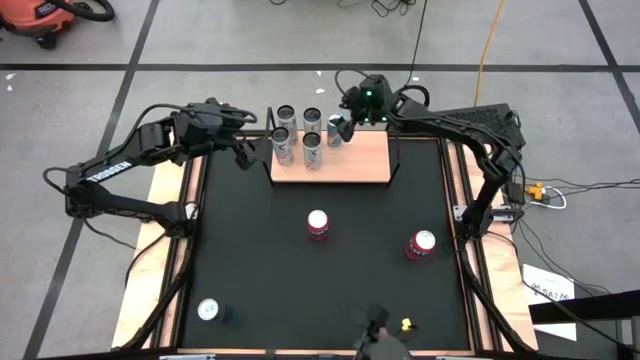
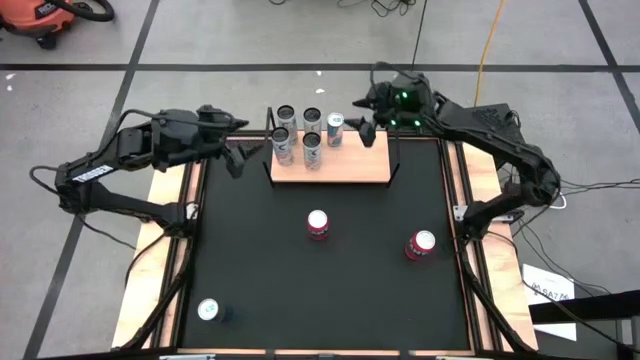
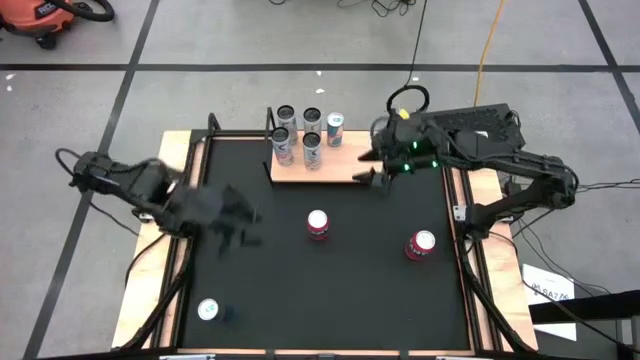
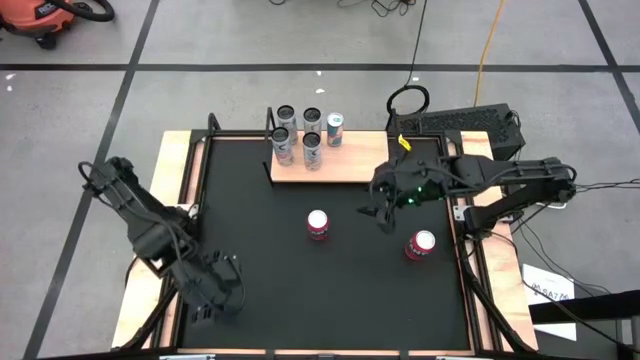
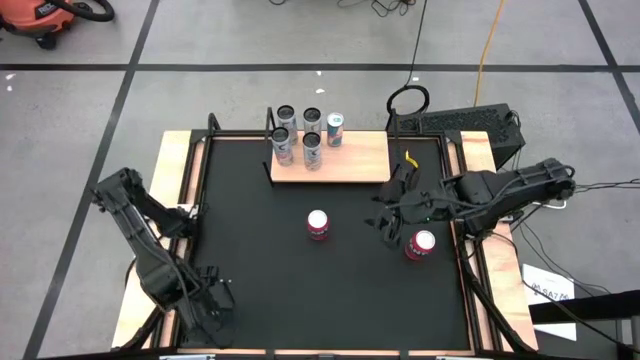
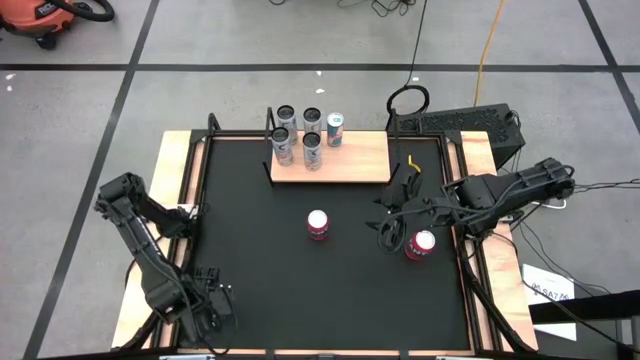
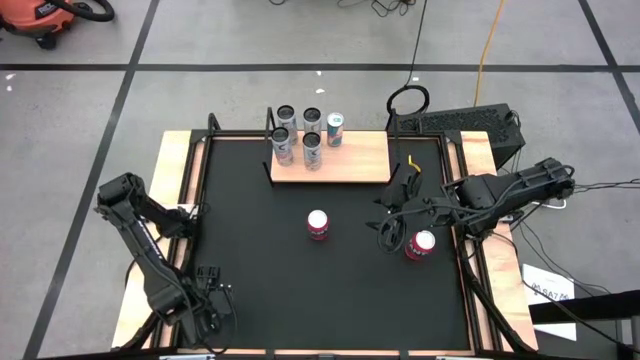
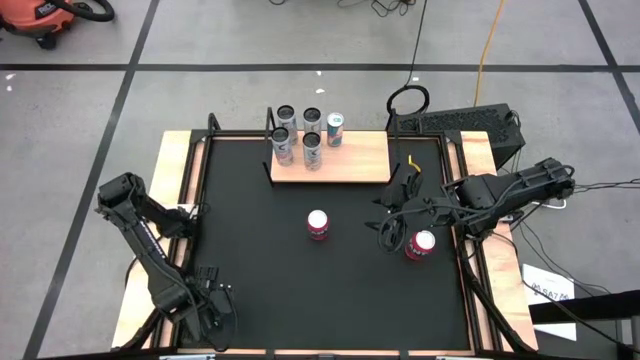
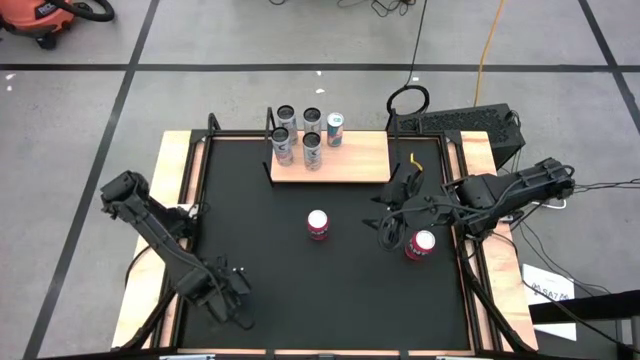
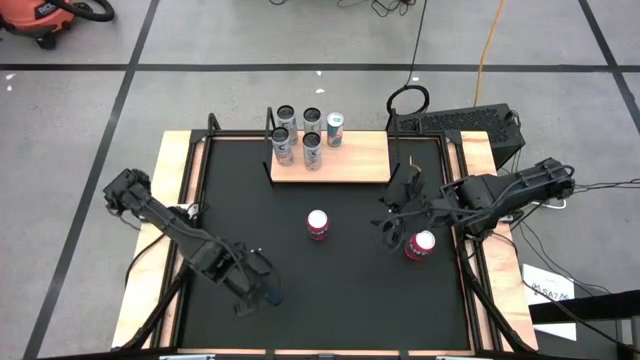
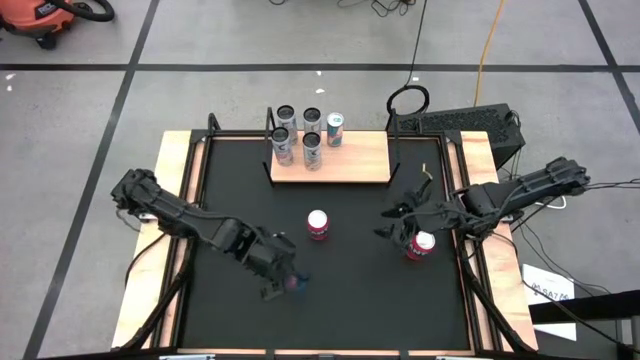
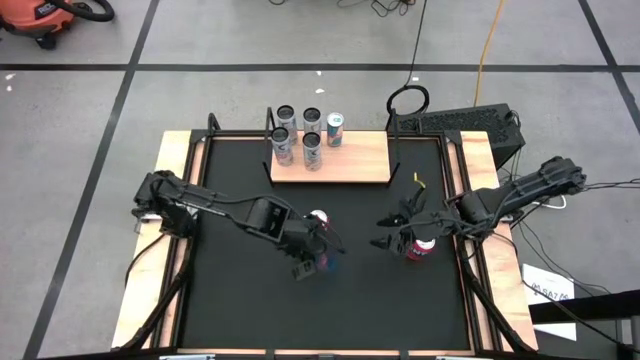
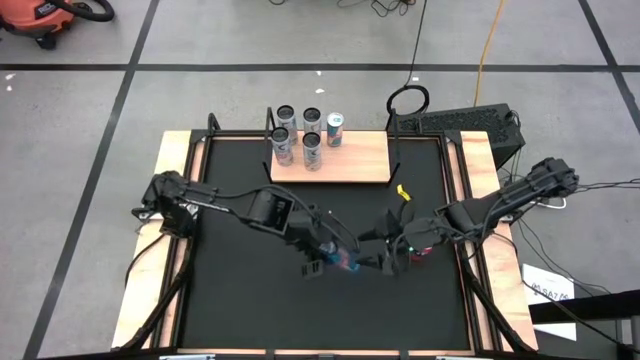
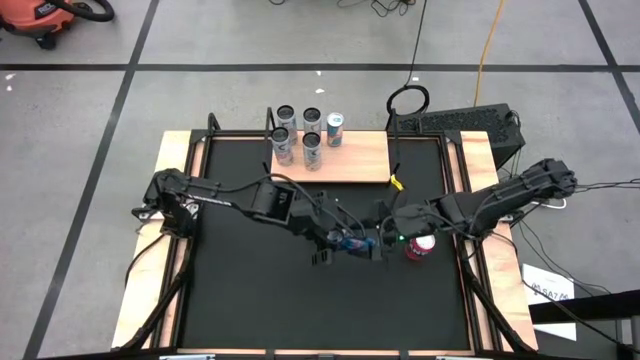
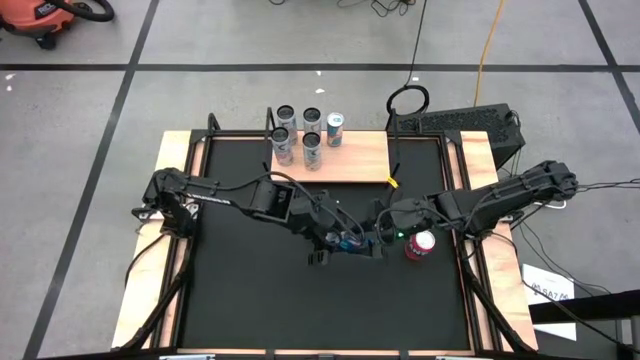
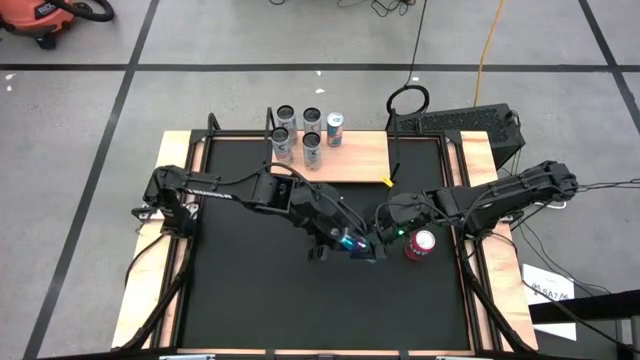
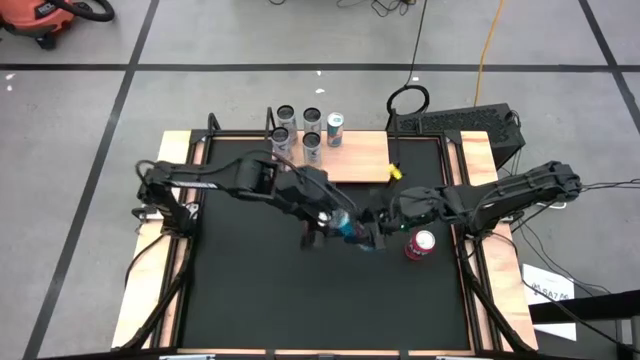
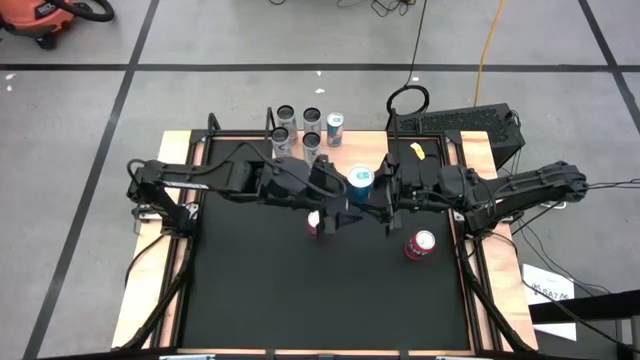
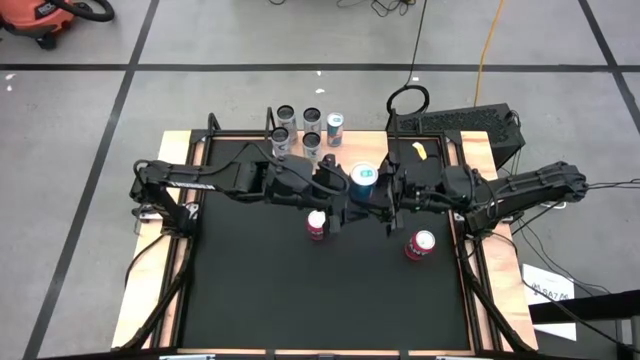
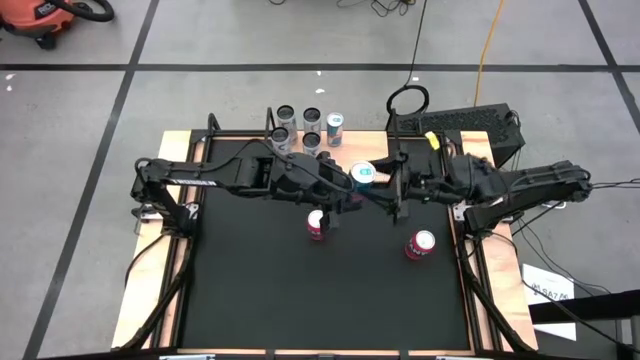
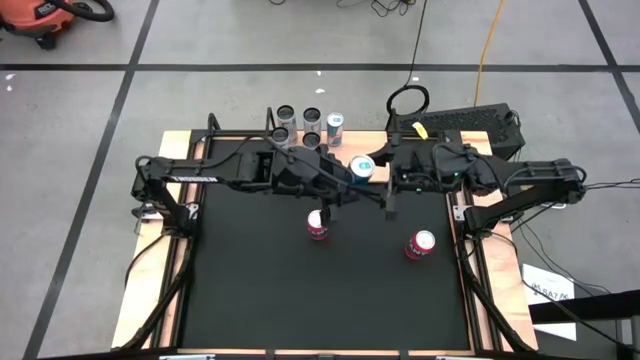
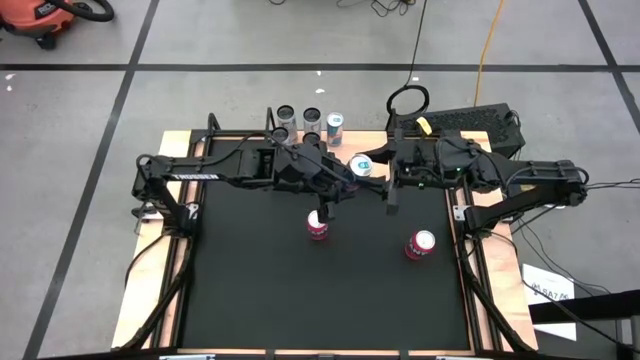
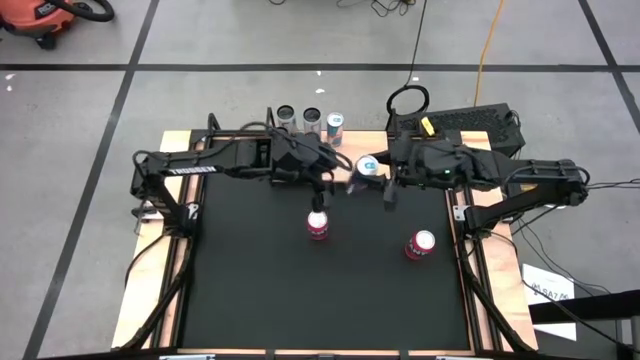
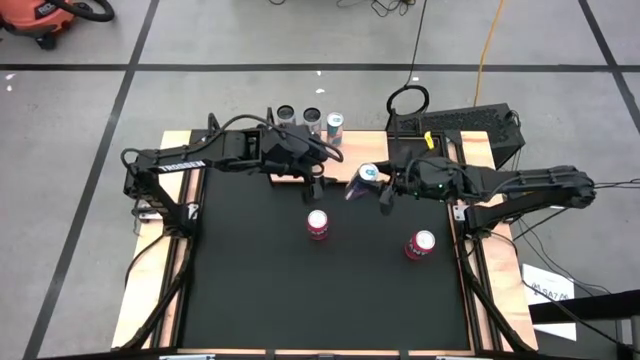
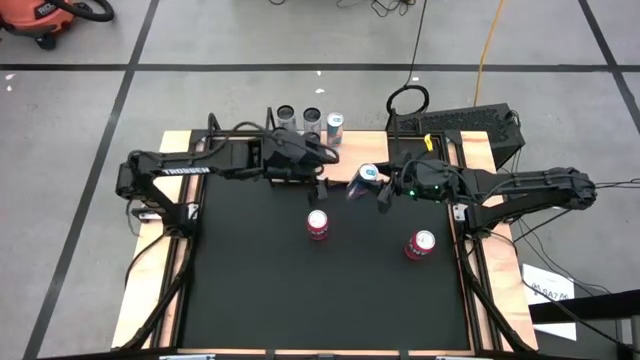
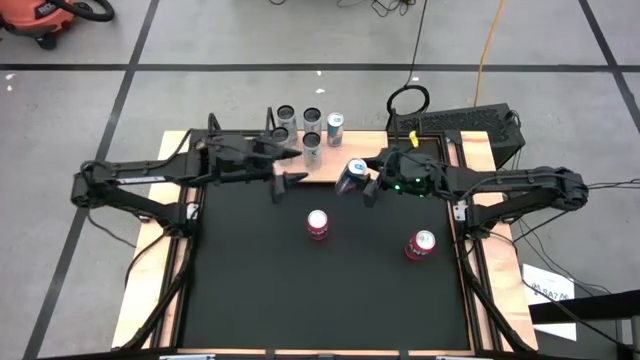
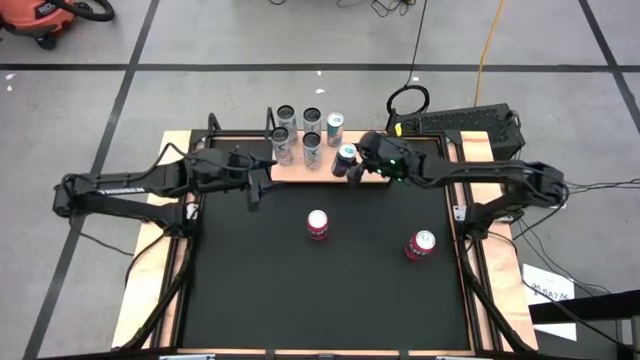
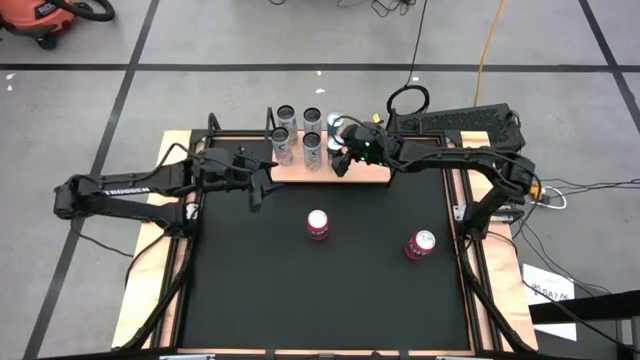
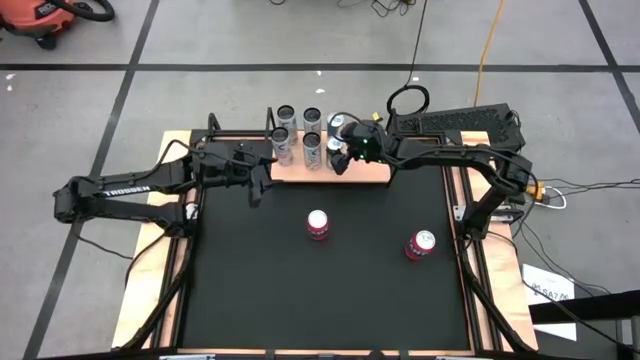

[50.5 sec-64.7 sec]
Task: Place canned beverage on shelf
Put the blue soda can on the shelf aligned with the other blue soda can on the shelf

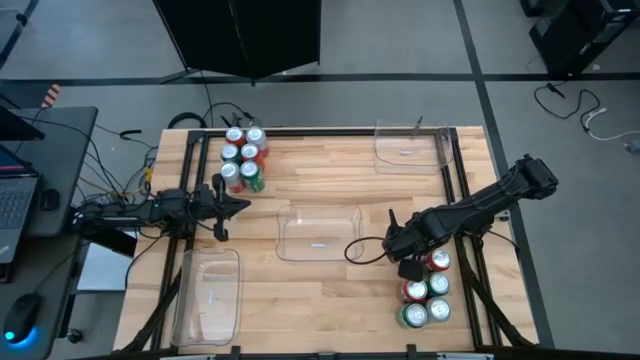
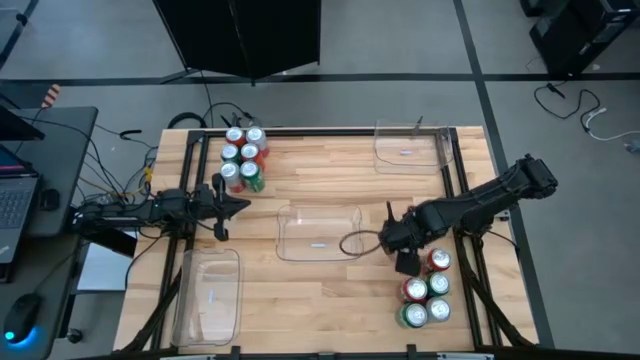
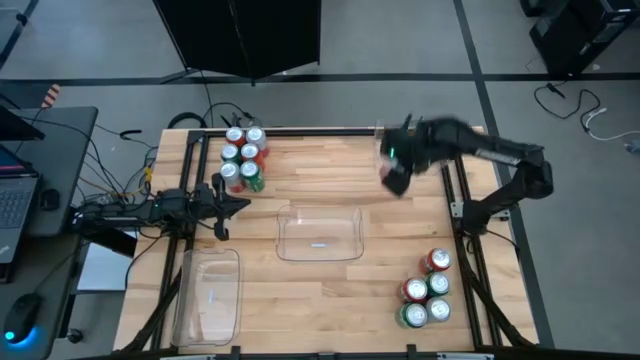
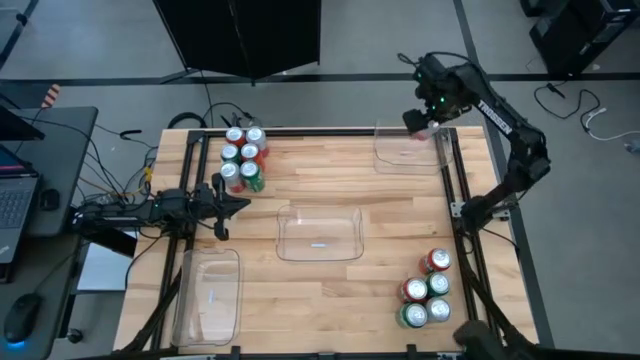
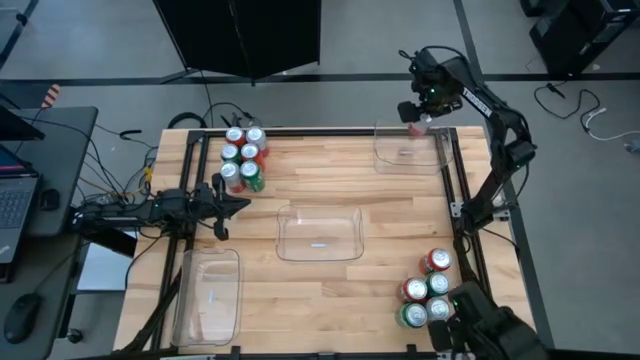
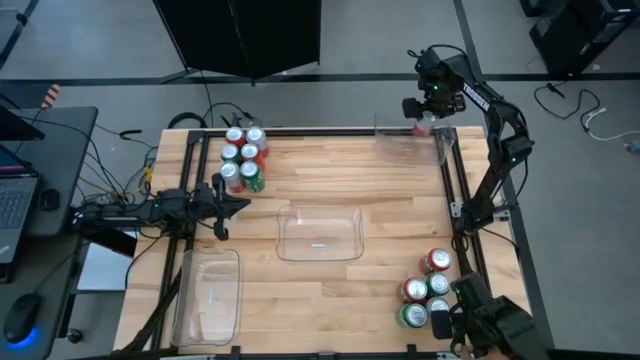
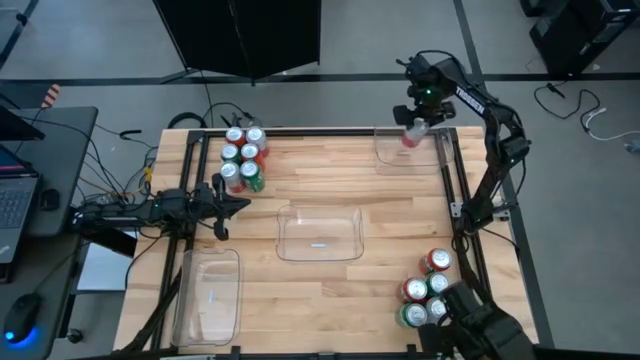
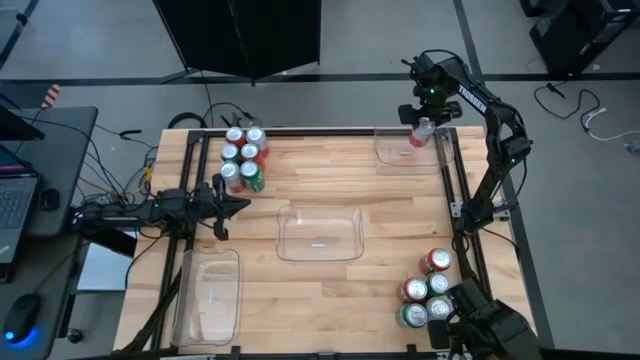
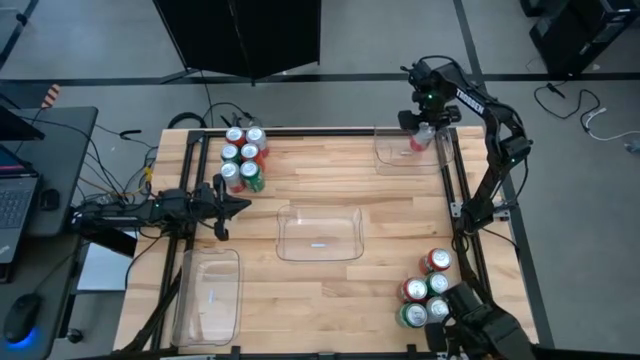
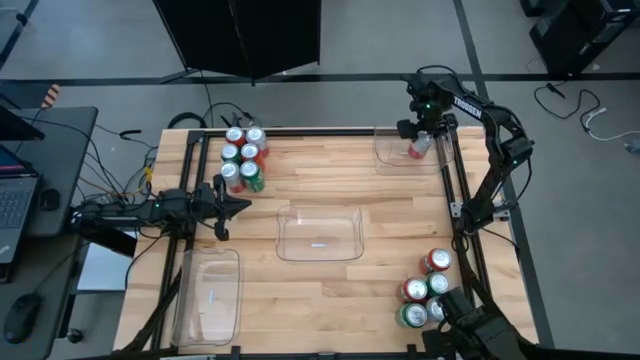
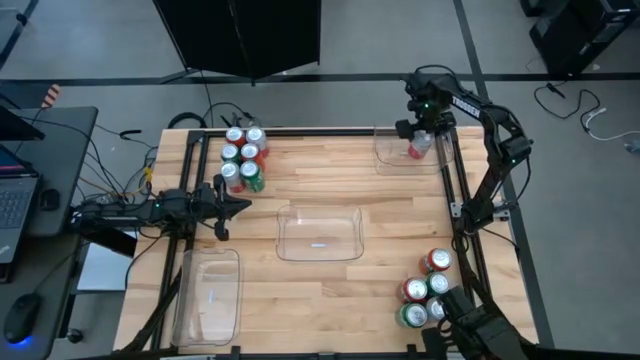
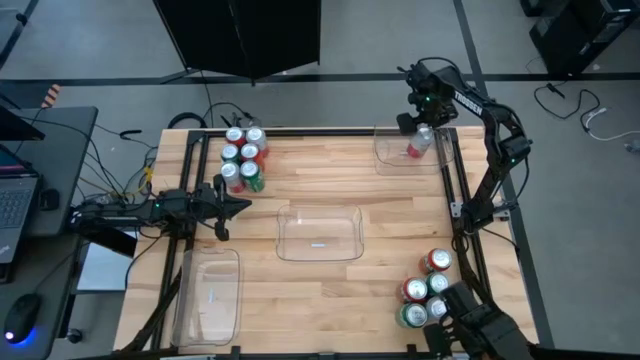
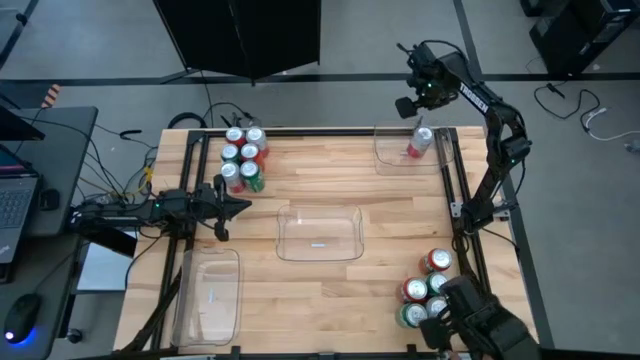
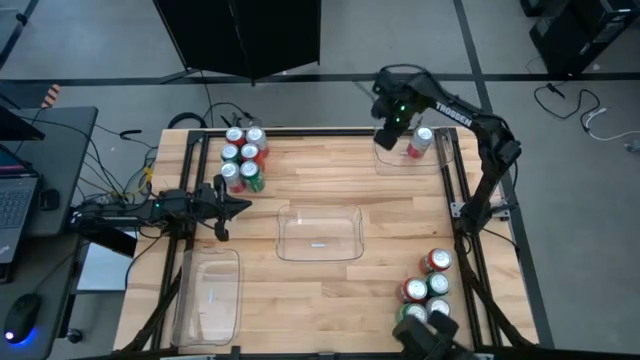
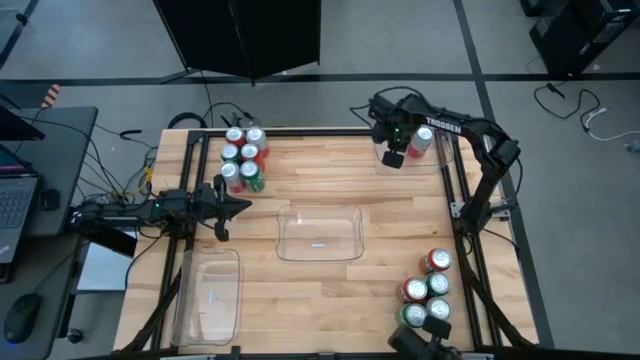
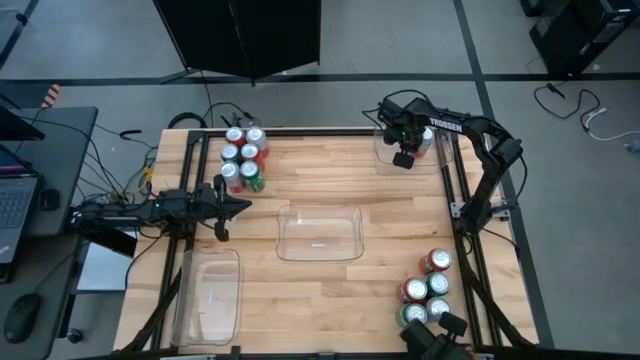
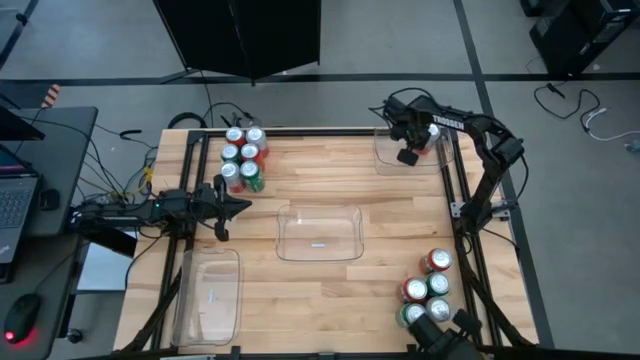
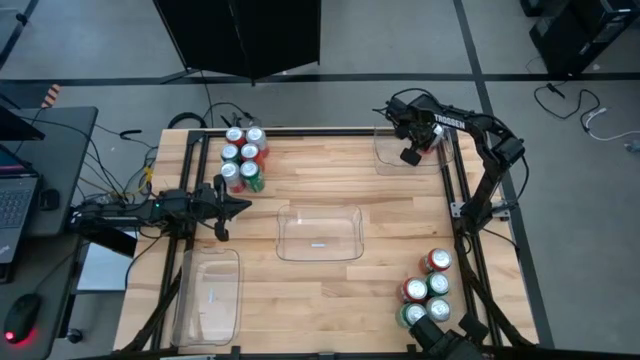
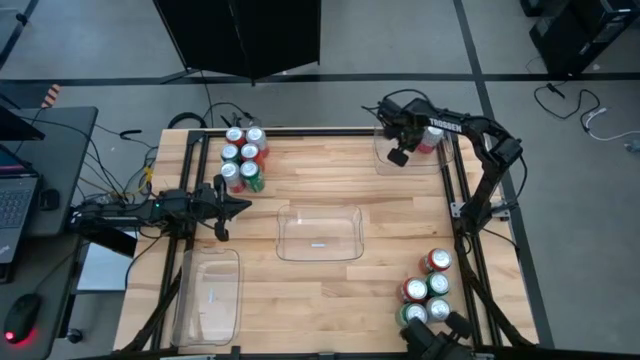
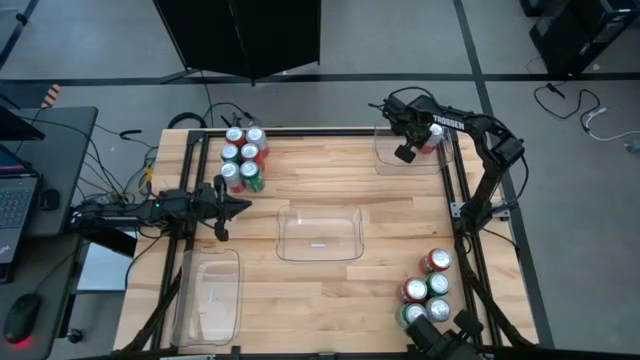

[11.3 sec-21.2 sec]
Task: Sort soda cans
Put the middle bottom pink white soda can into the top transparent bin
